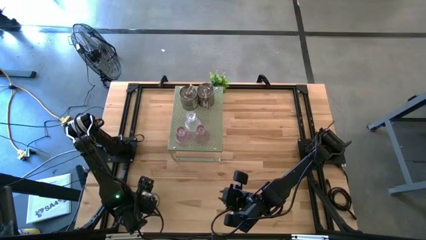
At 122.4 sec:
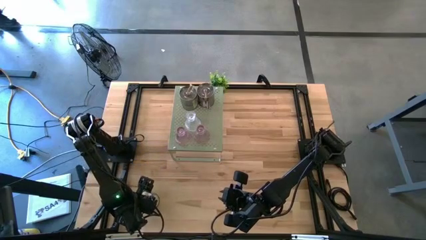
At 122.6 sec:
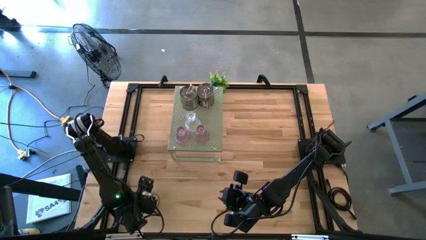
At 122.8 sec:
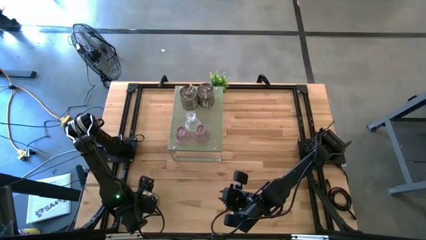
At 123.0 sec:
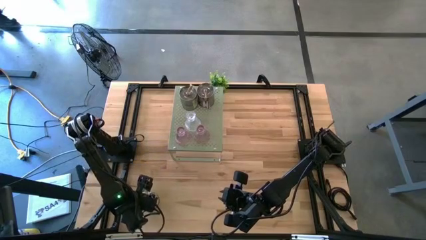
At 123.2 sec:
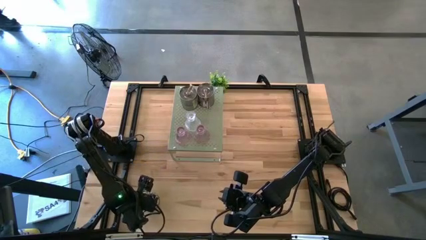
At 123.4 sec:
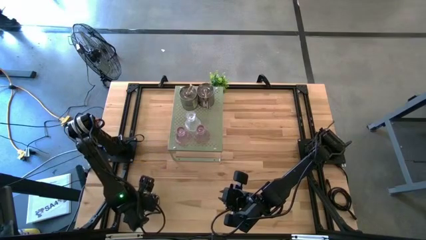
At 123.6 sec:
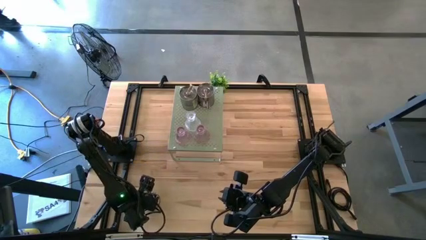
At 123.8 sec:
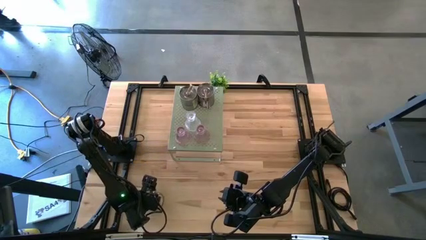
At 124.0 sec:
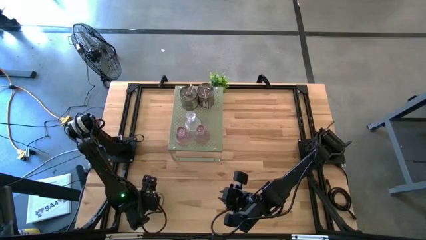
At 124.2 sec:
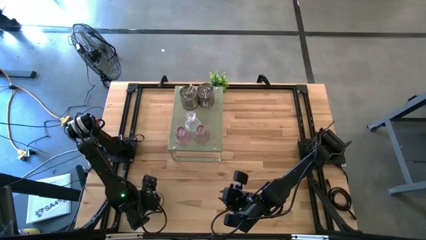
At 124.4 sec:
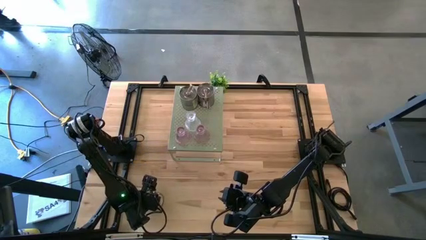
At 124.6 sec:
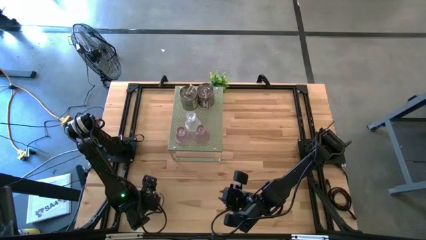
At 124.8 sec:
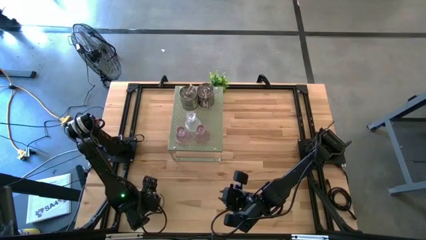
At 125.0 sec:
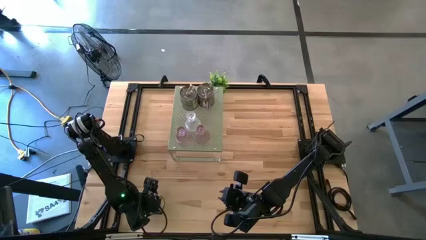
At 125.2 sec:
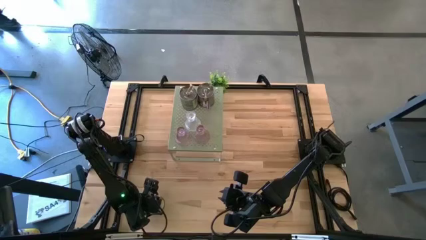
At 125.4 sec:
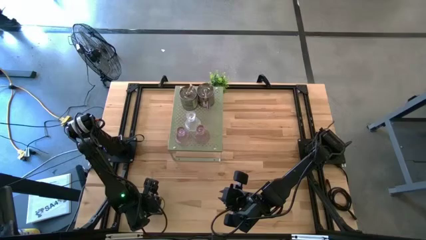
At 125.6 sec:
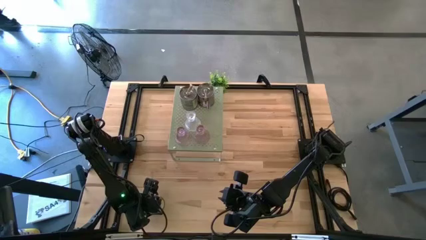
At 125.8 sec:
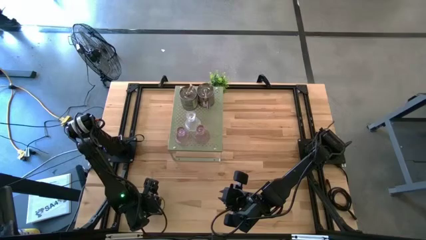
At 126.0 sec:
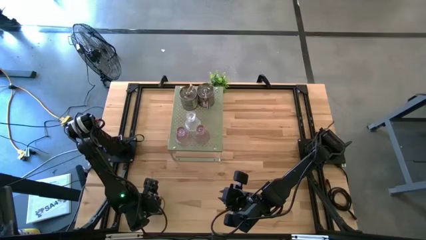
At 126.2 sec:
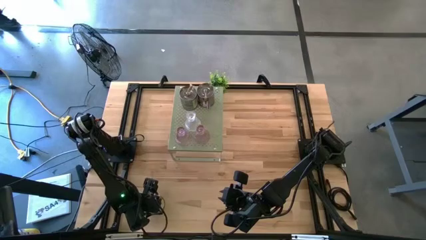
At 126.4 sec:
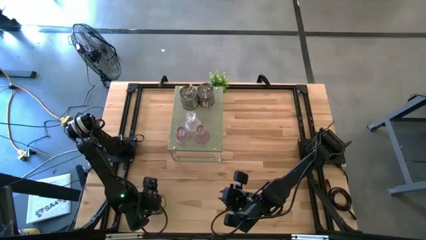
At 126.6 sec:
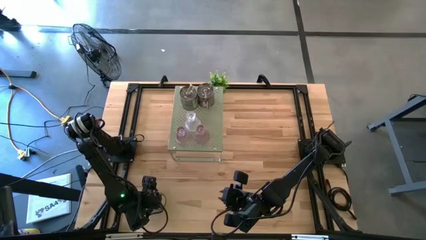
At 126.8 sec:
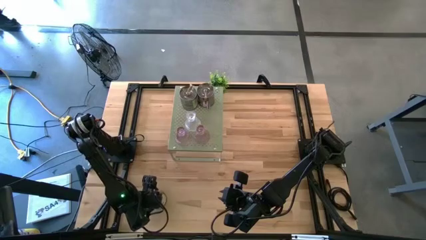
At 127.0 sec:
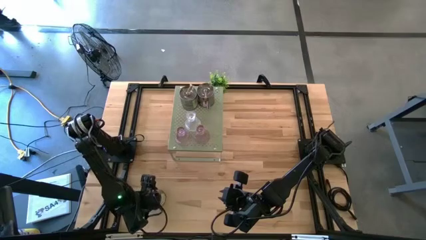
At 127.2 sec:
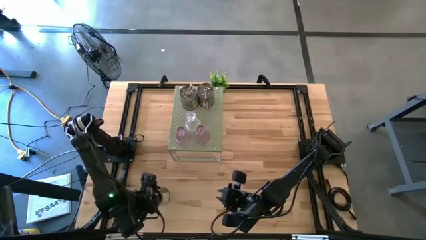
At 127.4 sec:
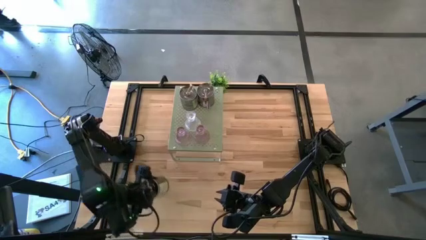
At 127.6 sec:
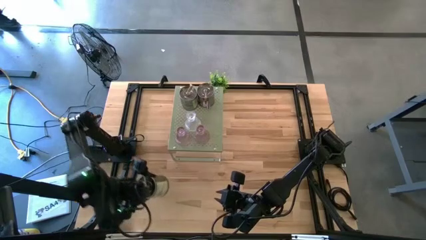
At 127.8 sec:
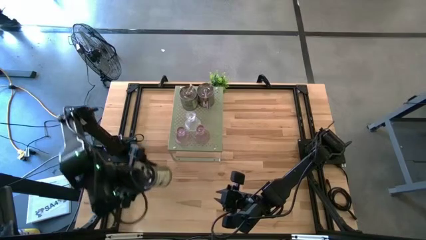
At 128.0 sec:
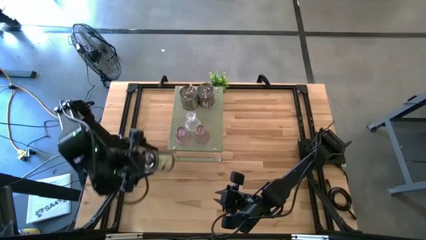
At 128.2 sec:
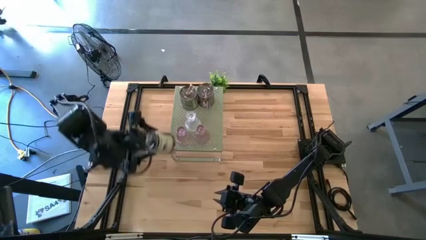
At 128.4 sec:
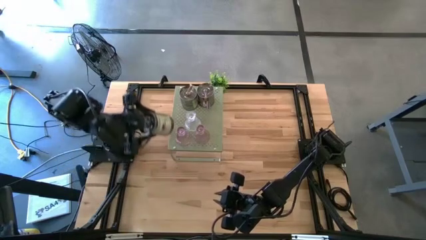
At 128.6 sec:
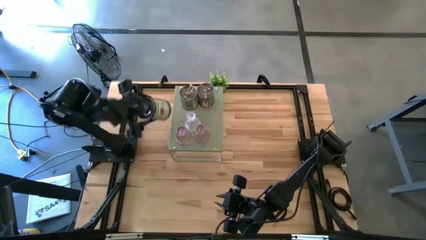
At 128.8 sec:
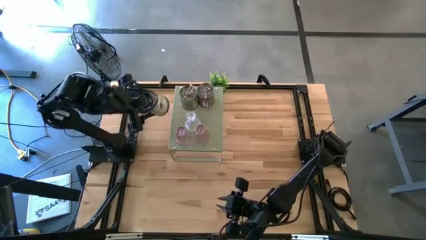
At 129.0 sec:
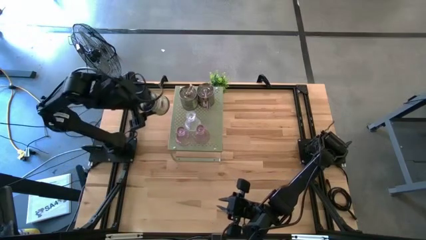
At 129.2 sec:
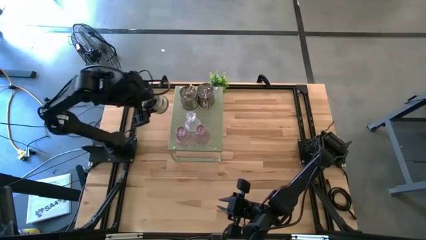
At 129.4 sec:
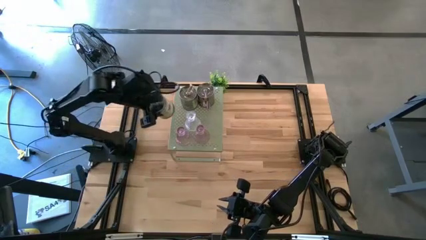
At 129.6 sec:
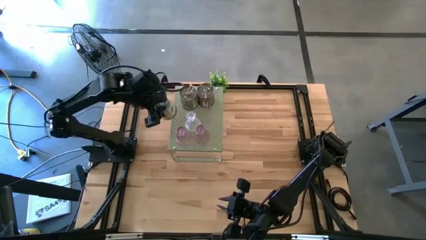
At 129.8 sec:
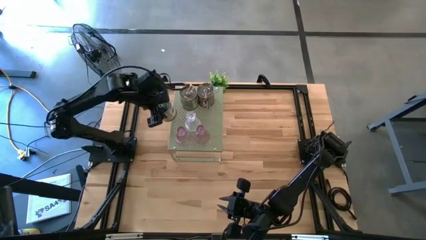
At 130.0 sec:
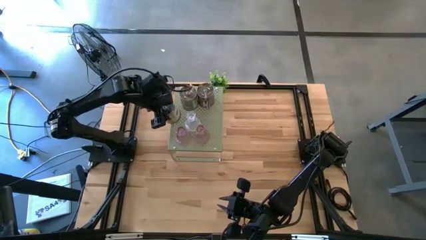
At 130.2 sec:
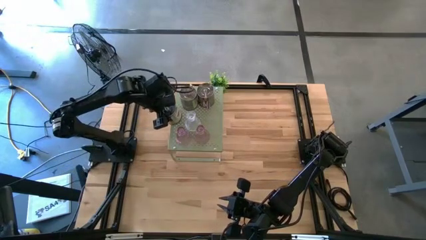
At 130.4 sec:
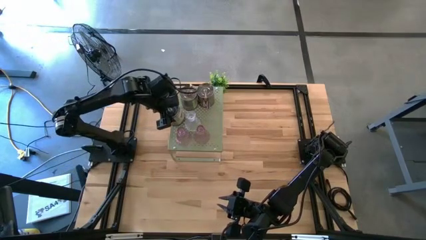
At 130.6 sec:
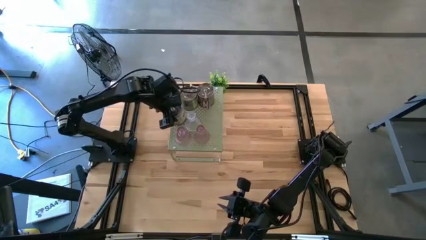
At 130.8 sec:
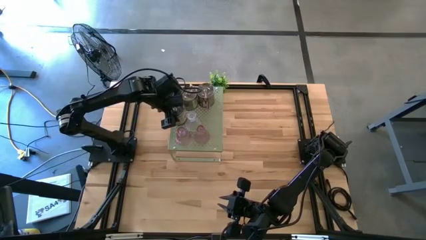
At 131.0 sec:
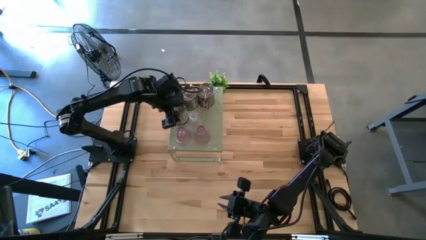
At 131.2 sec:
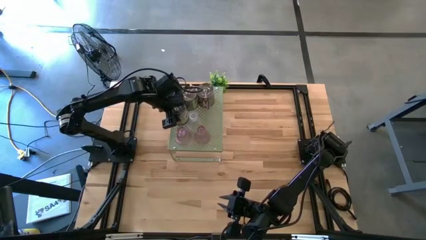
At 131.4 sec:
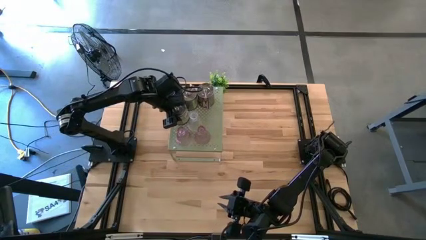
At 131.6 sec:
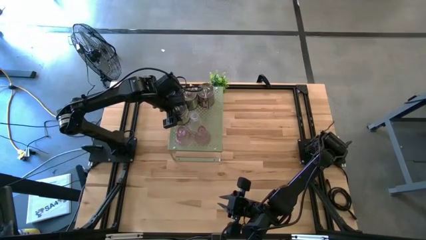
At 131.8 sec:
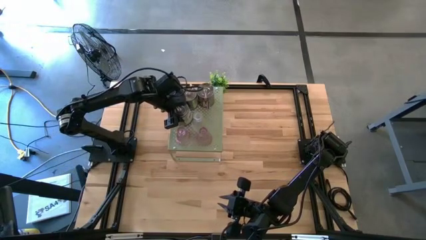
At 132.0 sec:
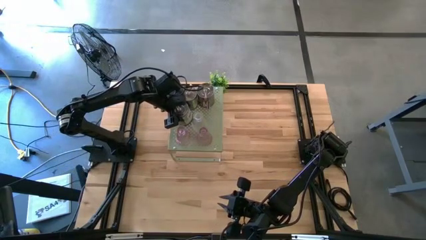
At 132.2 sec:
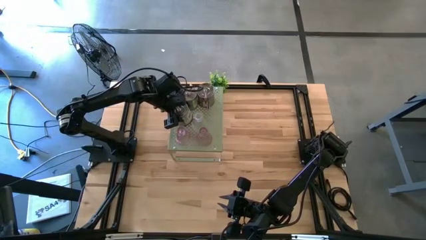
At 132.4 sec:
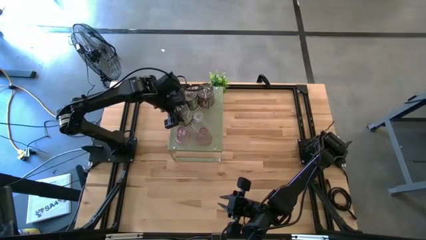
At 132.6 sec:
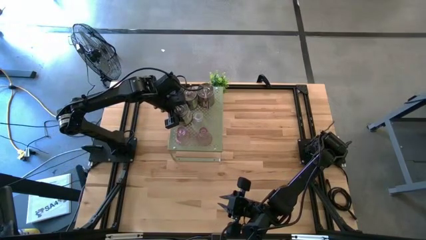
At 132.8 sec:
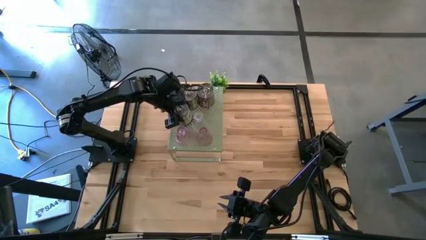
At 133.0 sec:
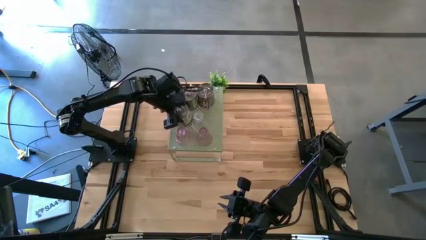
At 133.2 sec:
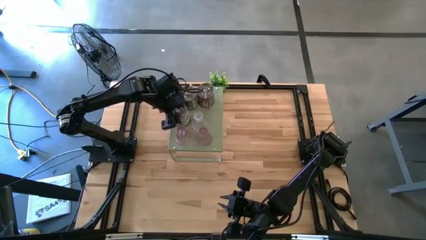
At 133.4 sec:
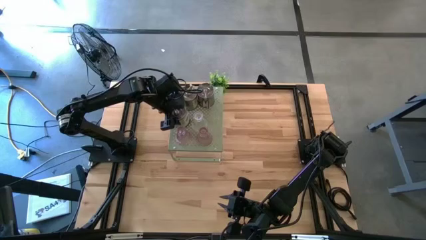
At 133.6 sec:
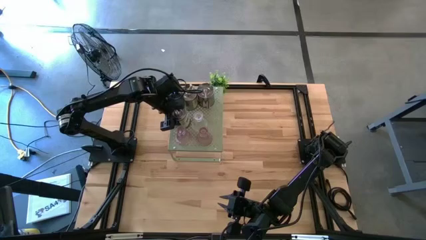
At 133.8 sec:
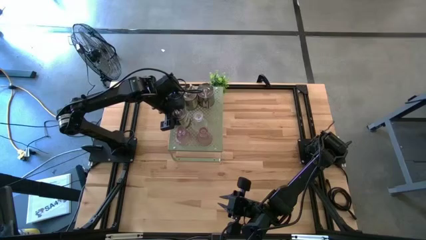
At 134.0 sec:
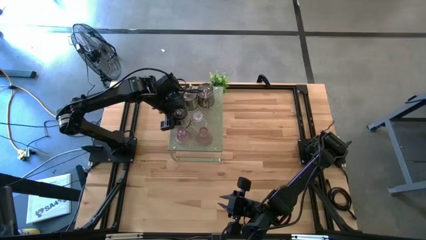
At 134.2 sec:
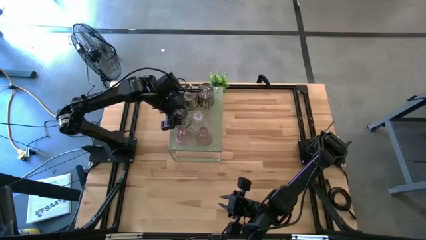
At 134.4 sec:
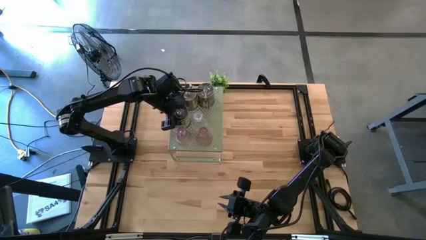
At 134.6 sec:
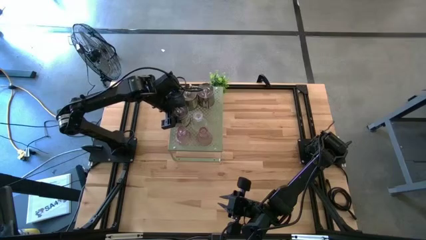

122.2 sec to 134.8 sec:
Task: Pick & Place candle stick holders
Put the brown scented candle on the shelf

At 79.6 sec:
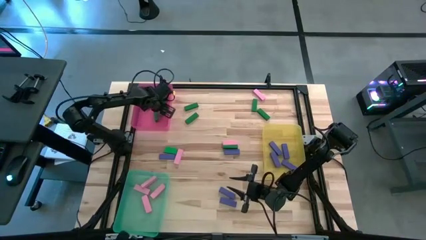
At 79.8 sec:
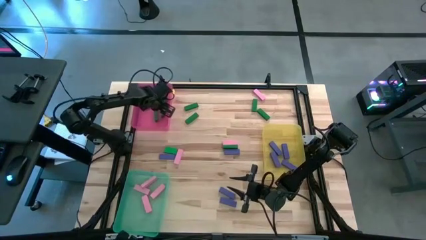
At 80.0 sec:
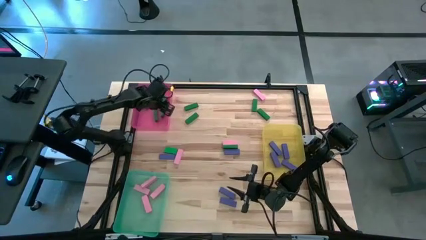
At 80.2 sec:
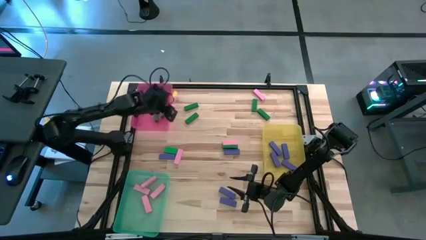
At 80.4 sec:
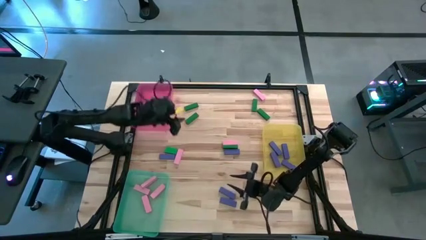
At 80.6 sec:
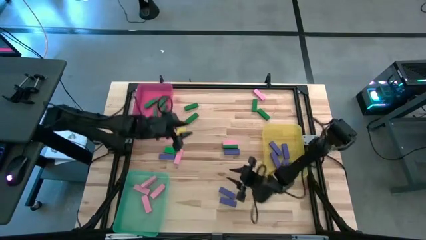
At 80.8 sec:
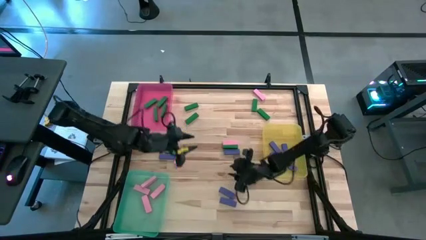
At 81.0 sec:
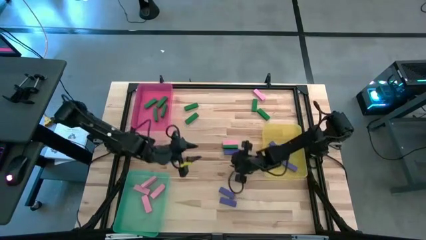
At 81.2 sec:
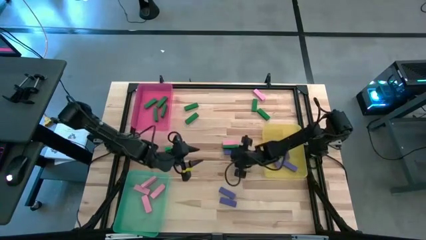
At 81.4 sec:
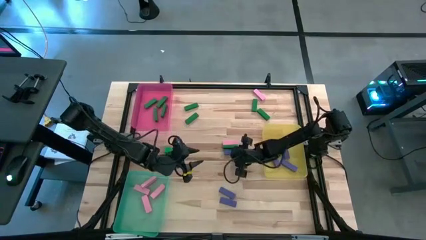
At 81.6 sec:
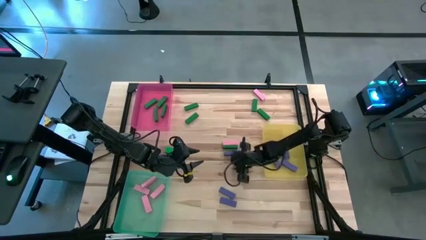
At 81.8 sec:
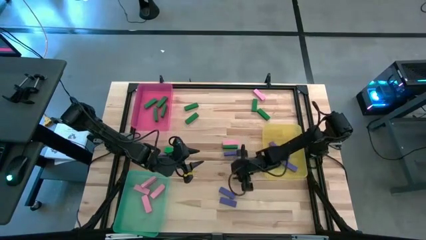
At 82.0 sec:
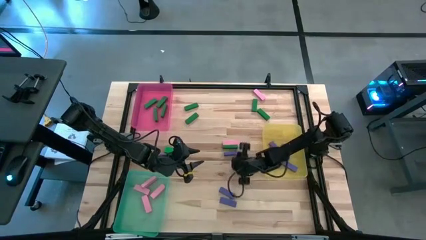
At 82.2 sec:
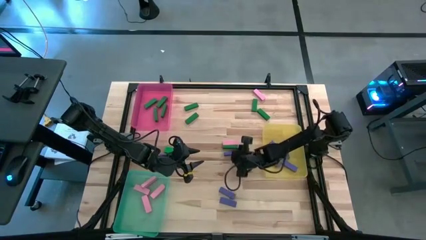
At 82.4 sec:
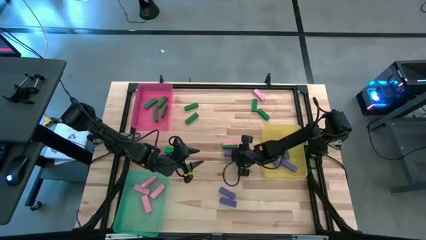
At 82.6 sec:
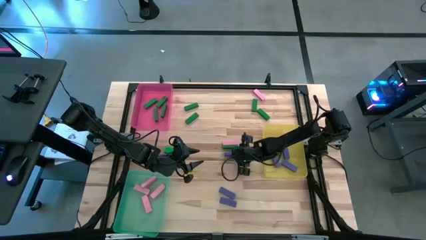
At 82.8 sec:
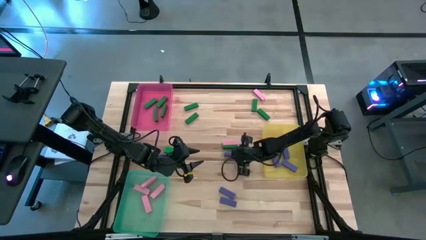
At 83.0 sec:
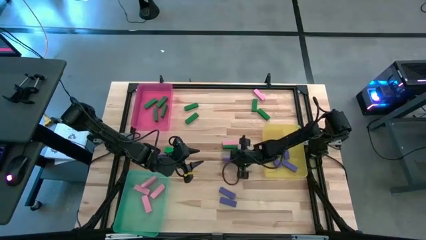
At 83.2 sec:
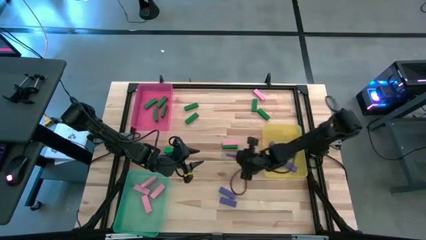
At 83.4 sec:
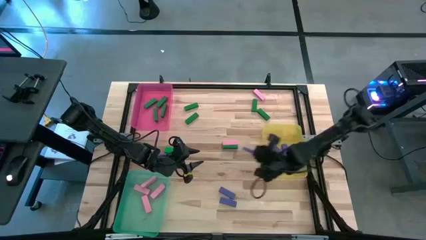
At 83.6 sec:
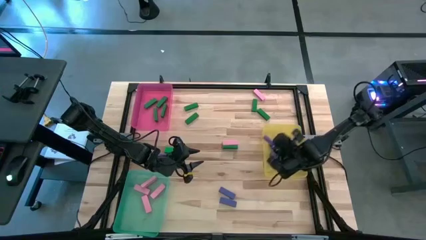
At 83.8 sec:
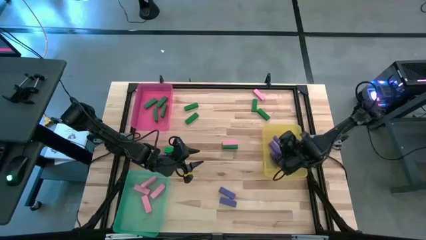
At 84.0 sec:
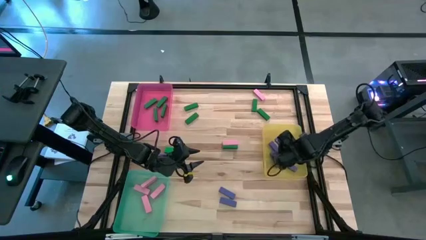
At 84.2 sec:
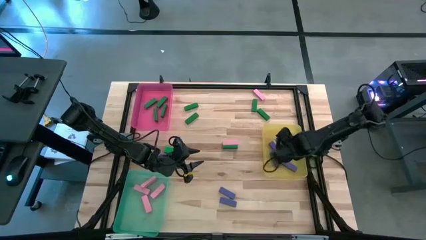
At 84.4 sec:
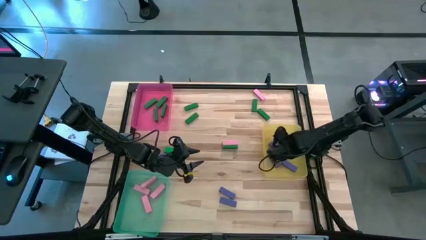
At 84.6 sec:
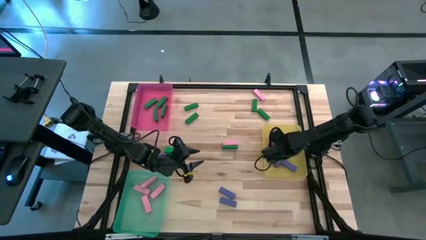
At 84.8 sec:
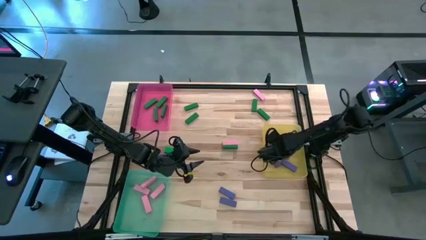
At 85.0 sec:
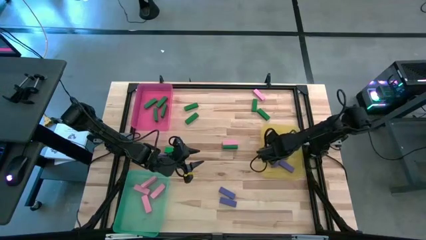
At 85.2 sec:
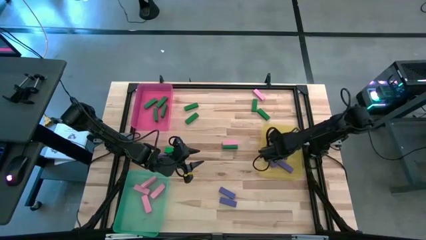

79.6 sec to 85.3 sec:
Task: Sort blocks
Put the blue block into the yellow bin
